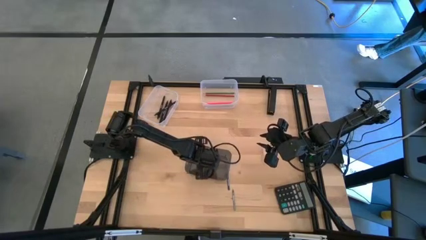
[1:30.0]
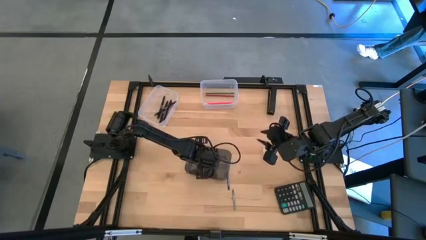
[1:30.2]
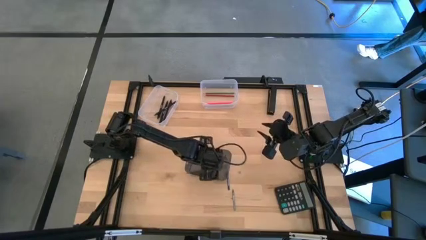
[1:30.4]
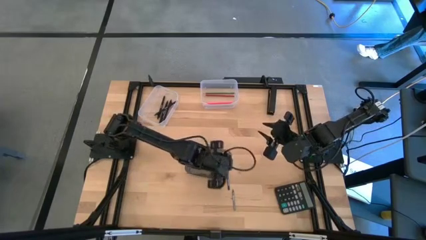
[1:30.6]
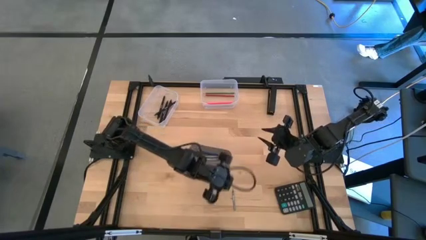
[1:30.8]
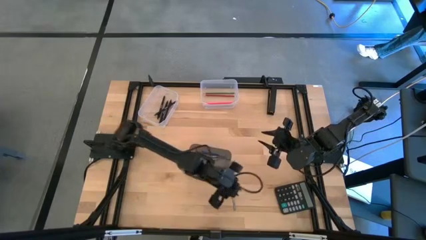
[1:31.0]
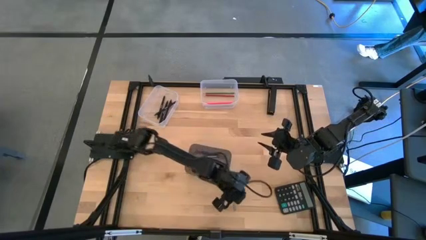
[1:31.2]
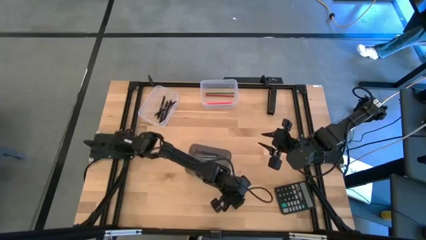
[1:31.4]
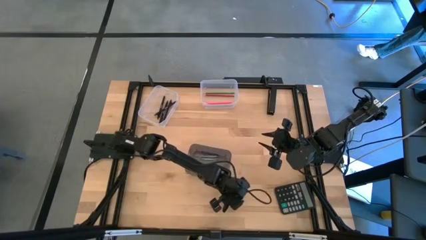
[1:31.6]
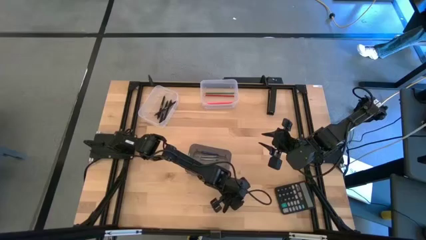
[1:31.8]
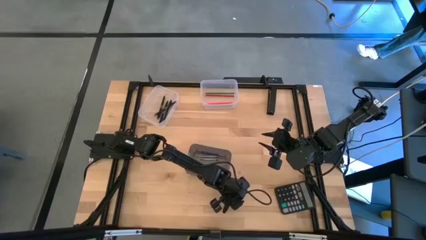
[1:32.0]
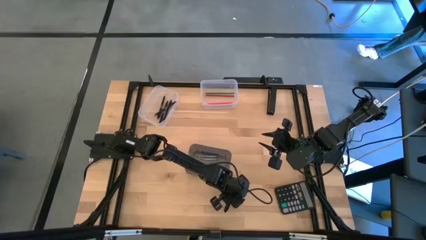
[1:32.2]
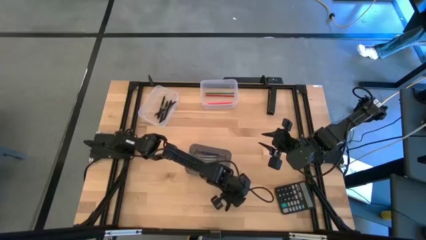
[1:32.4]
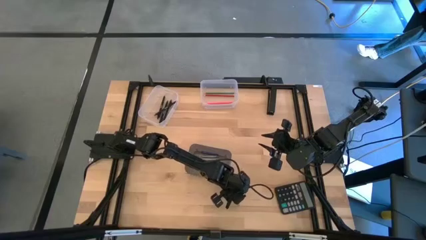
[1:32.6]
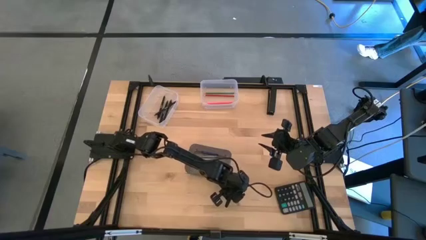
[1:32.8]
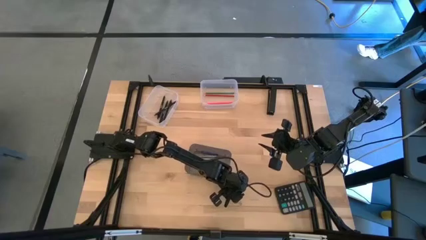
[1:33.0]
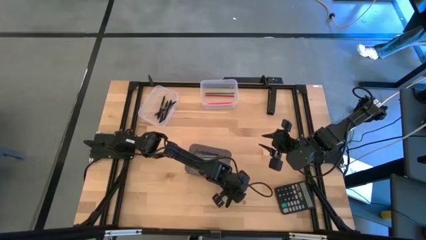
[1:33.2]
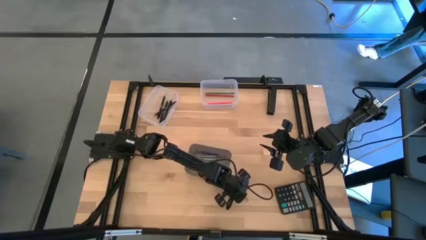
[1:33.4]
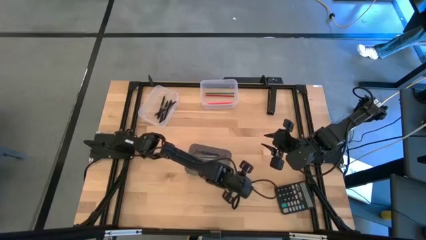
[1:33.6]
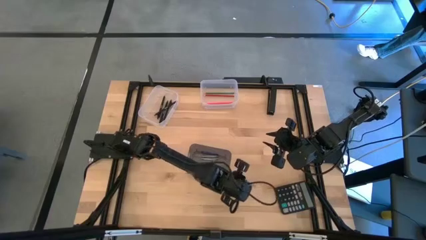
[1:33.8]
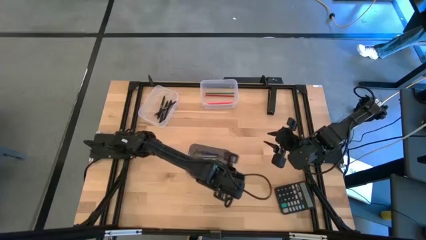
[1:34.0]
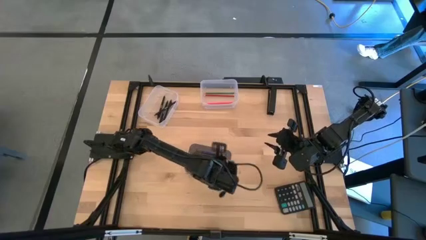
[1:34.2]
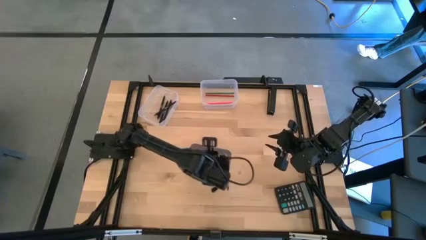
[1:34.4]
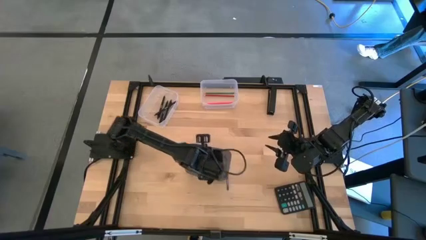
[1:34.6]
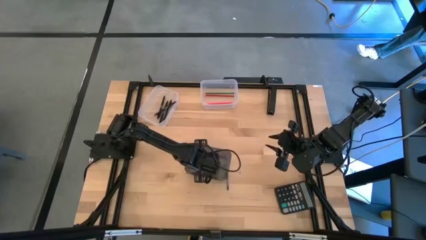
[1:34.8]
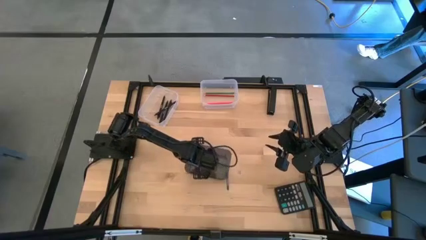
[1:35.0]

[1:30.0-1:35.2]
Task: Sort crayons/erasers/pens/pencils in bins
Put the gray crayon into the center black bin

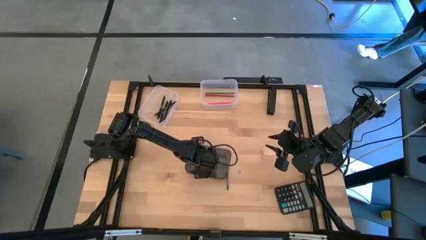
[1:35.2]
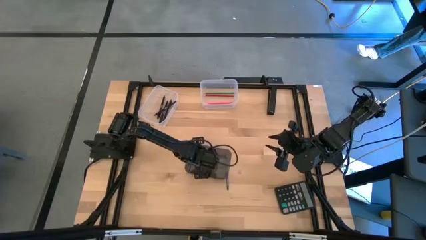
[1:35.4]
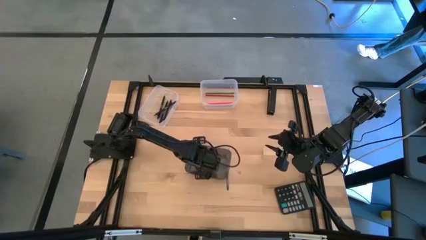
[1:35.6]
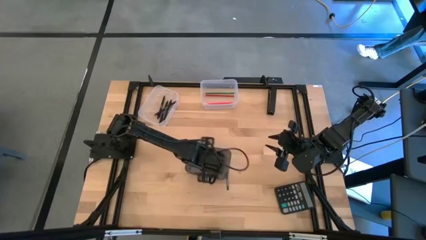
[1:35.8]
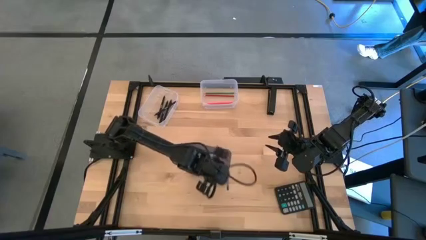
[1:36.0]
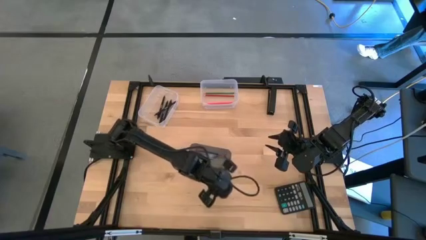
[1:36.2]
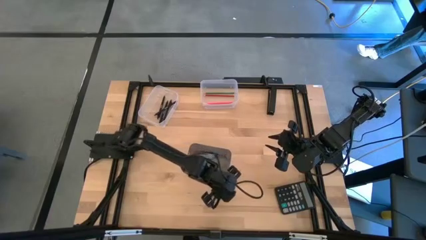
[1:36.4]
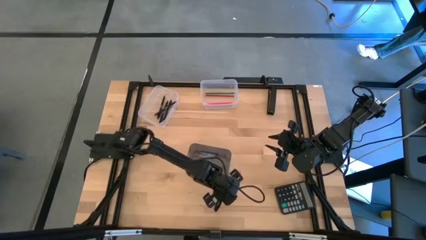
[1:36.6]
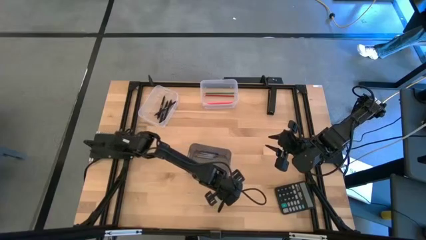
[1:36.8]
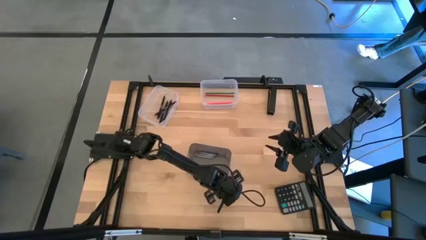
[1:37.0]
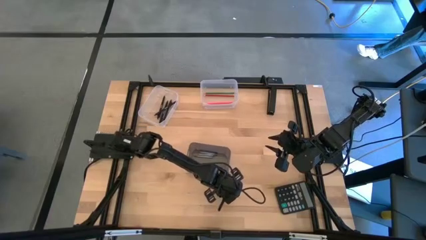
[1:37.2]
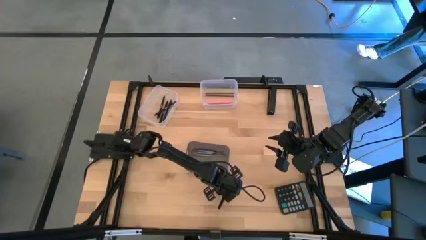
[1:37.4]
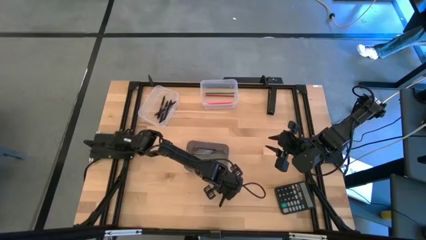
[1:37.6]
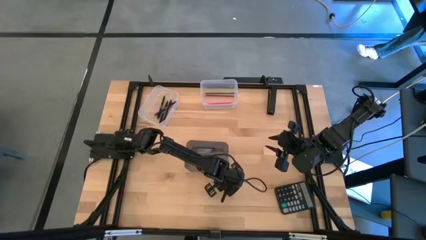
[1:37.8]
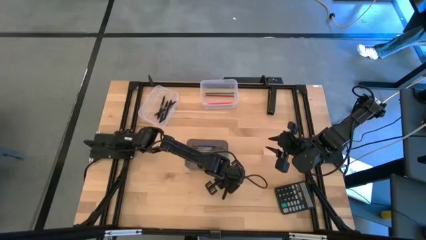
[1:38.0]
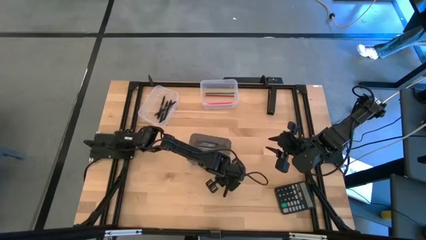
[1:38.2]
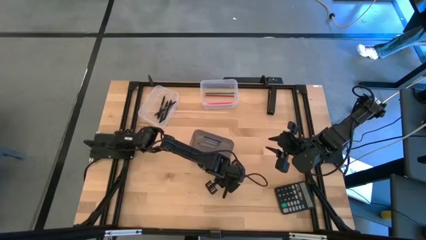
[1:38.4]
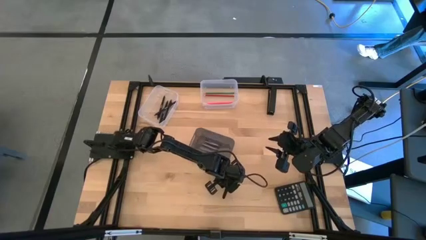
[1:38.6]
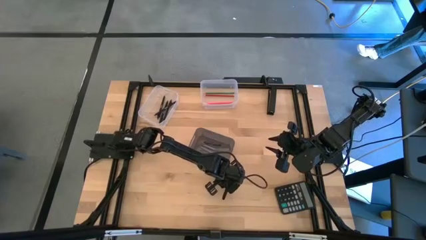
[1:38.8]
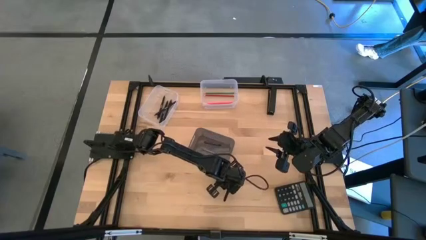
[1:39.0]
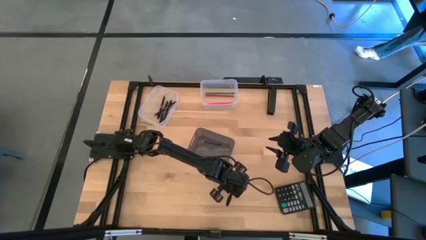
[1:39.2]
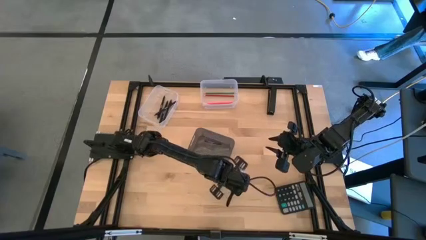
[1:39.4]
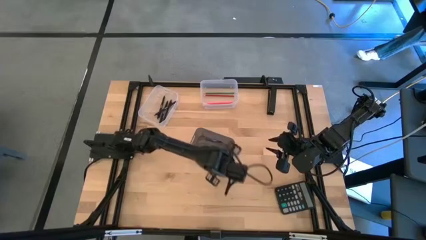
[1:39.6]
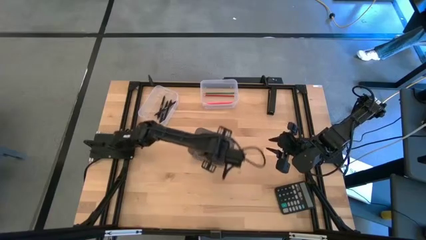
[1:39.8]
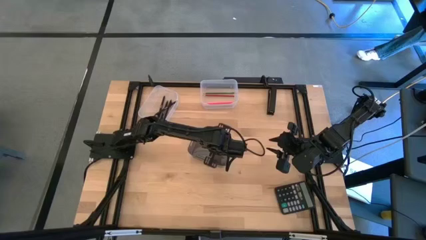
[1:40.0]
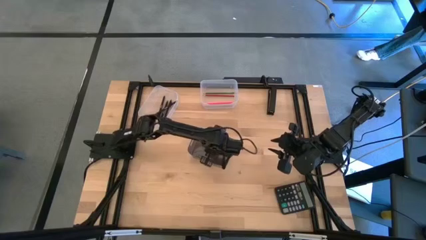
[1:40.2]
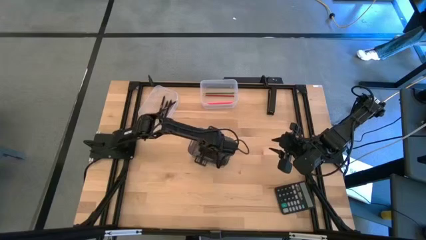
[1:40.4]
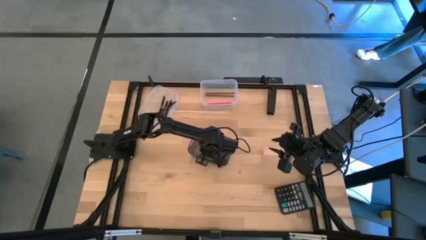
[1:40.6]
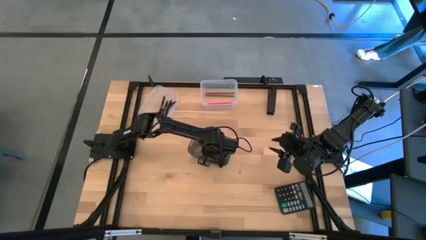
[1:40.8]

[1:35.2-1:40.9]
Put the dark blue crayon into the center black bin

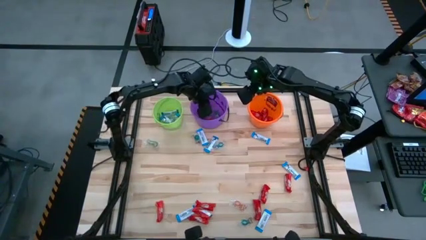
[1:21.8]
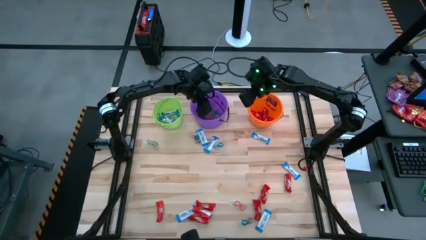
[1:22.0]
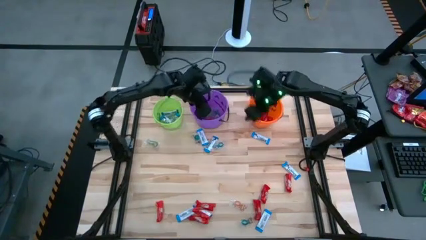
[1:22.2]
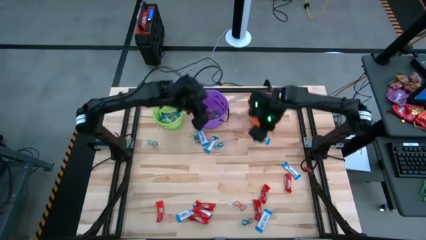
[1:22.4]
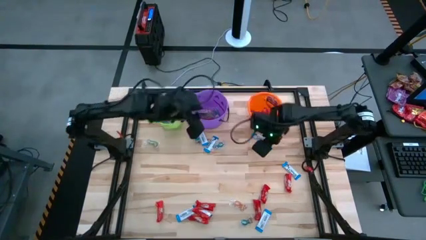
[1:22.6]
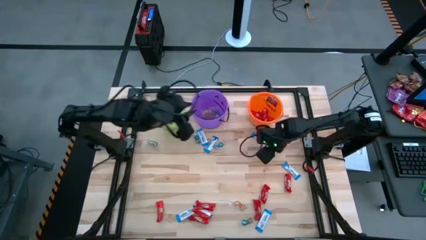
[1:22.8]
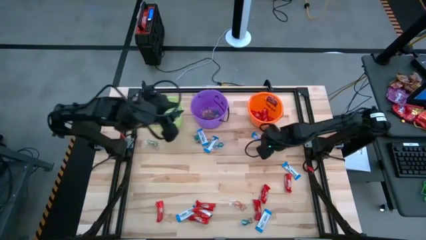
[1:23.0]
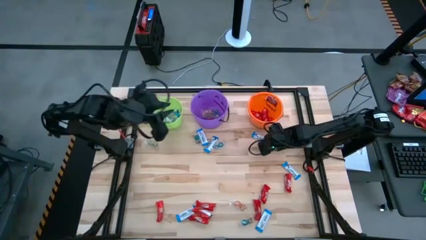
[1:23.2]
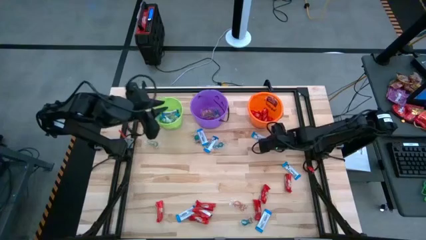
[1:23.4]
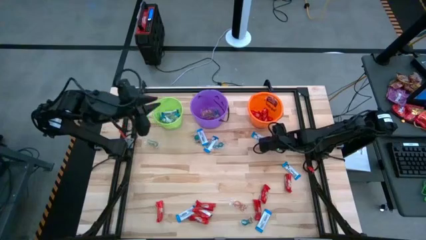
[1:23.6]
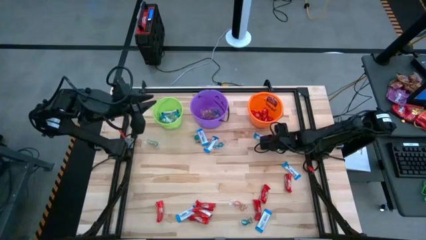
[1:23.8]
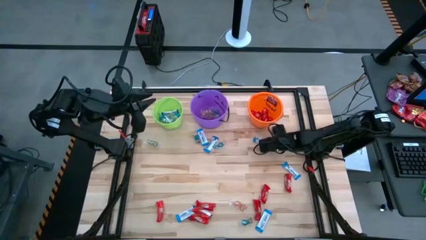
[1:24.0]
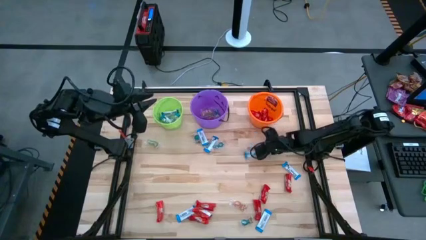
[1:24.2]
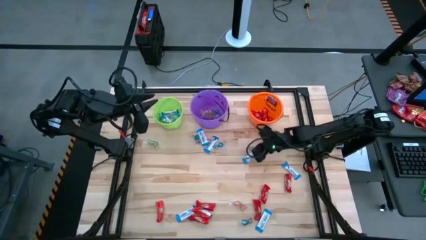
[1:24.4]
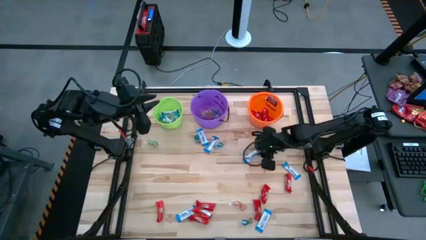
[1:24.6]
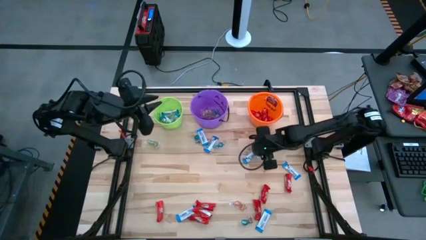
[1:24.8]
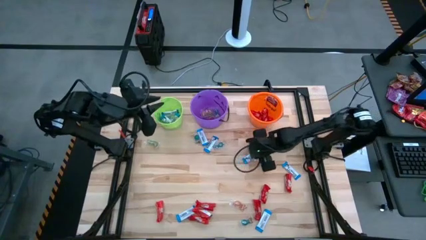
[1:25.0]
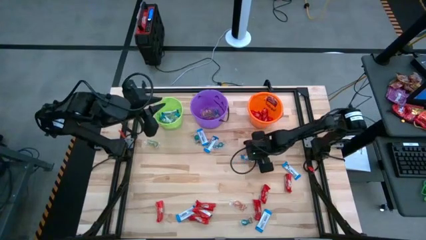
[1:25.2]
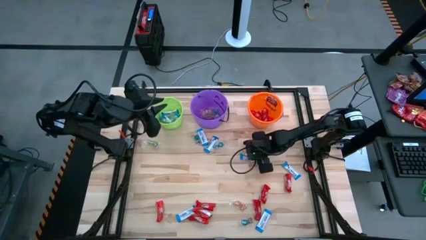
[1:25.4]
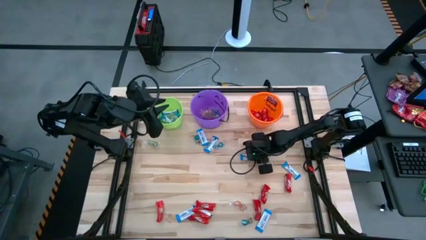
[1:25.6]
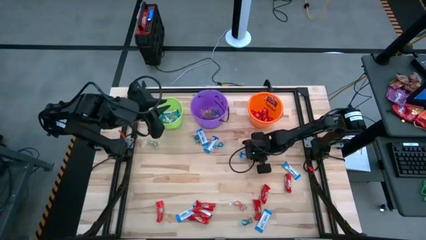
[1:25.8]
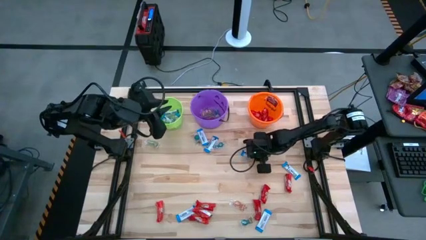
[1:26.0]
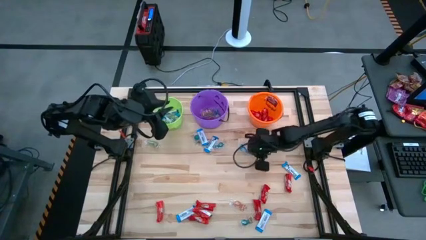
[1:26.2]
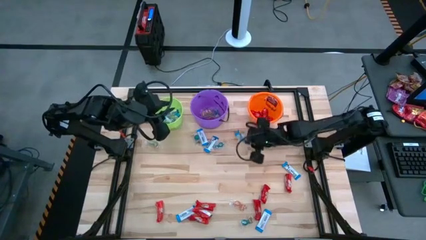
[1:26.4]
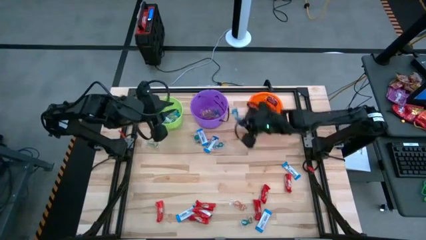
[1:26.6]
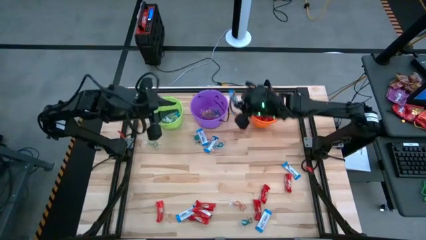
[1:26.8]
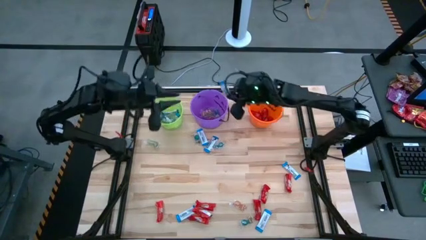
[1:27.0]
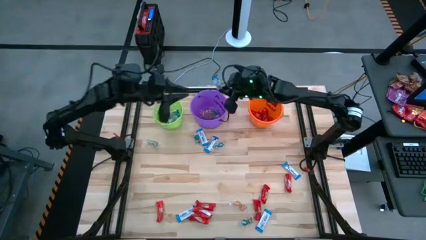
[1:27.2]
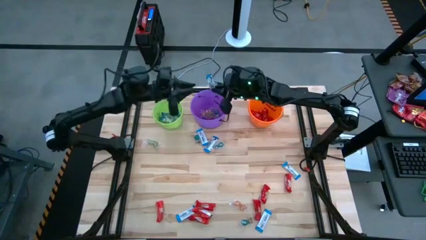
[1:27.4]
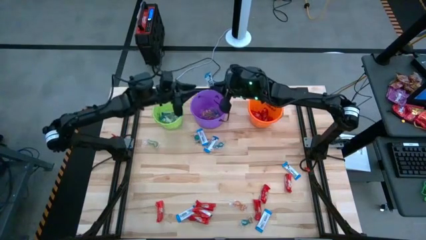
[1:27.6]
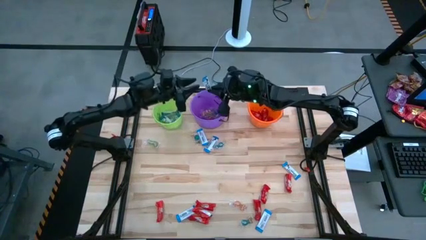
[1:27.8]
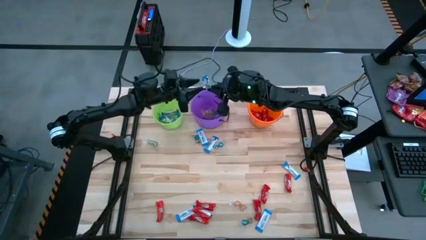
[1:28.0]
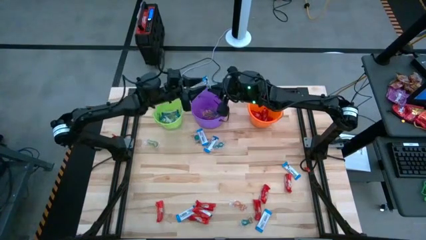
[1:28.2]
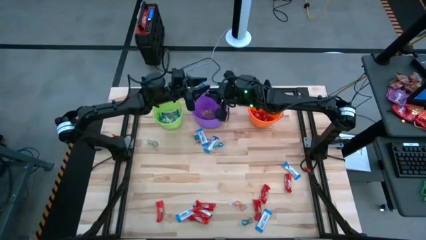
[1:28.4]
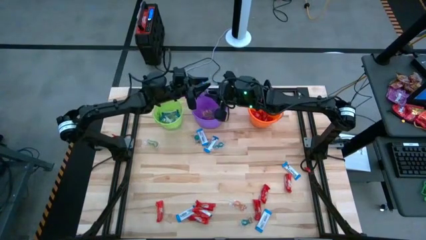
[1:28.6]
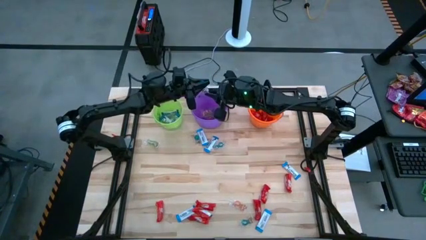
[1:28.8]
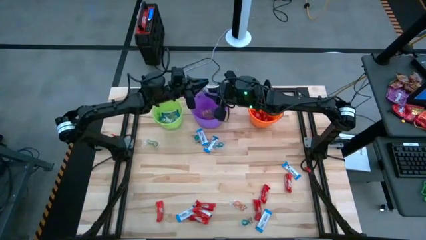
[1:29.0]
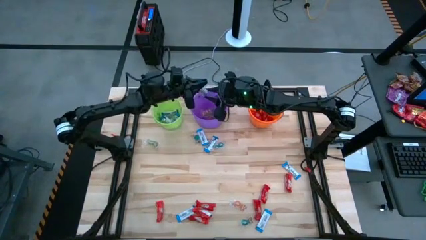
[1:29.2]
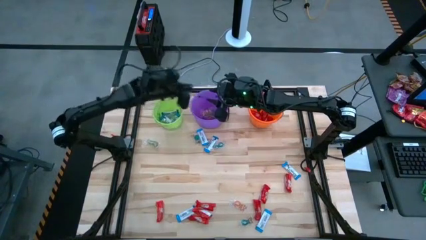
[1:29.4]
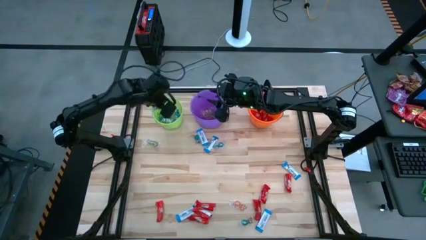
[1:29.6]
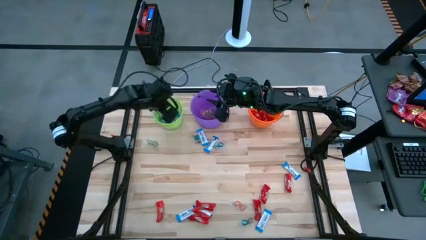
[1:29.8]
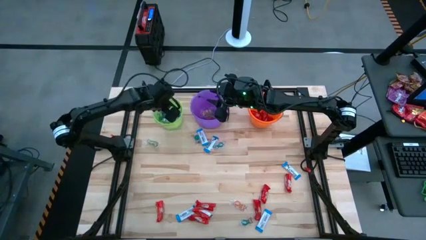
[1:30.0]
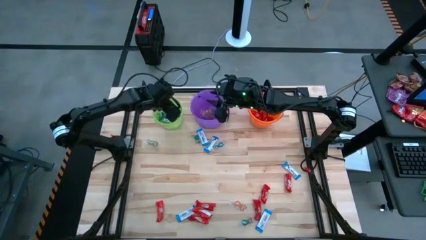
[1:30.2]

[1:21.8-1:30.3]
Task: Sort candy by brand, put in halloween buckets
Put the white chocolate into the green bucket
